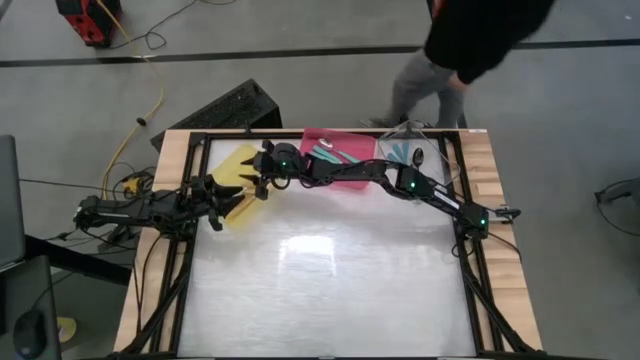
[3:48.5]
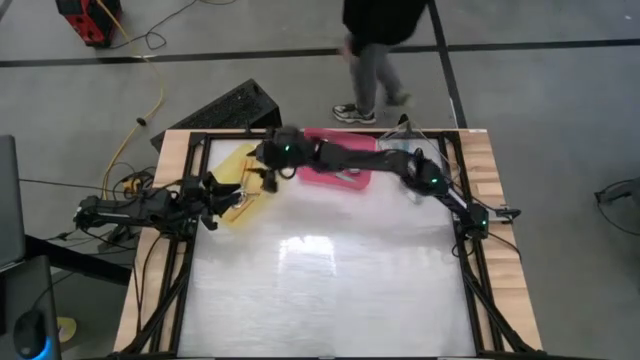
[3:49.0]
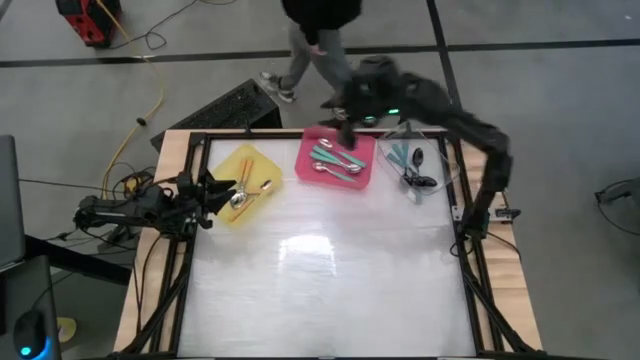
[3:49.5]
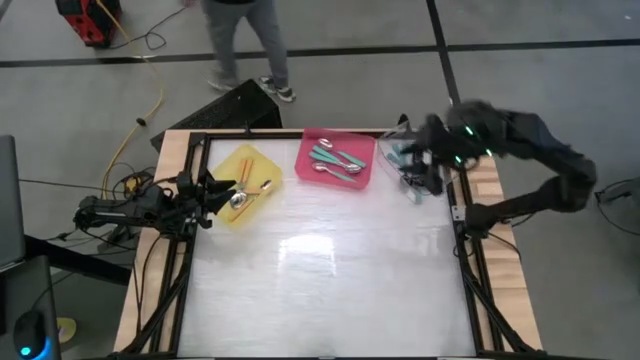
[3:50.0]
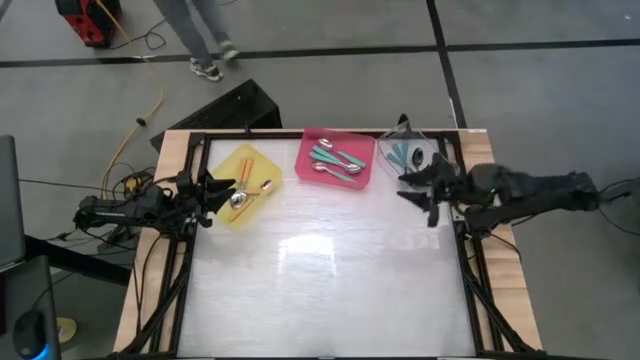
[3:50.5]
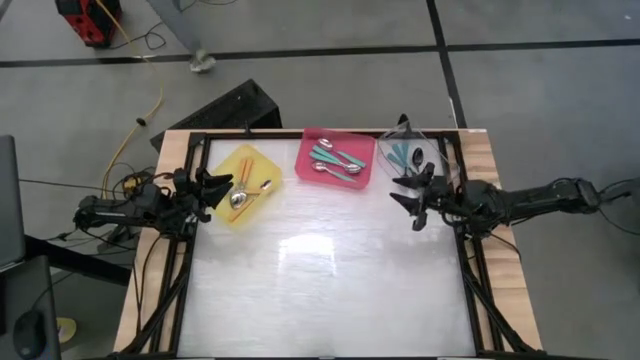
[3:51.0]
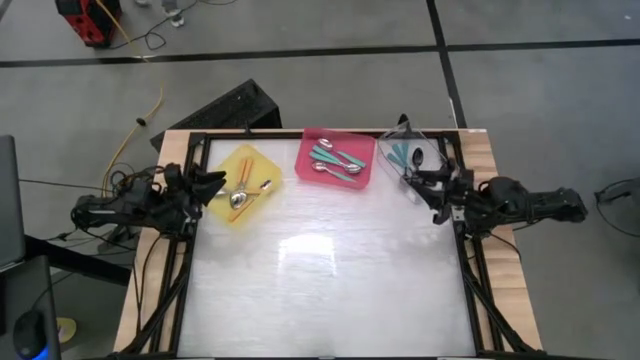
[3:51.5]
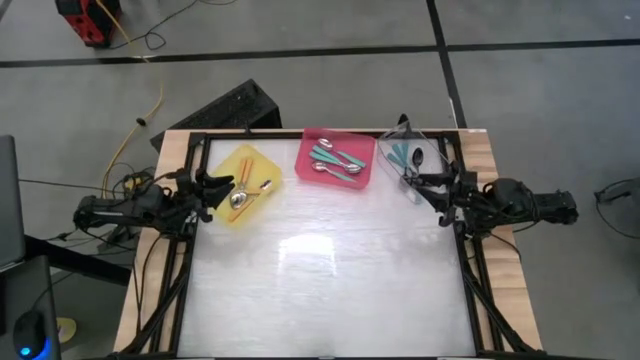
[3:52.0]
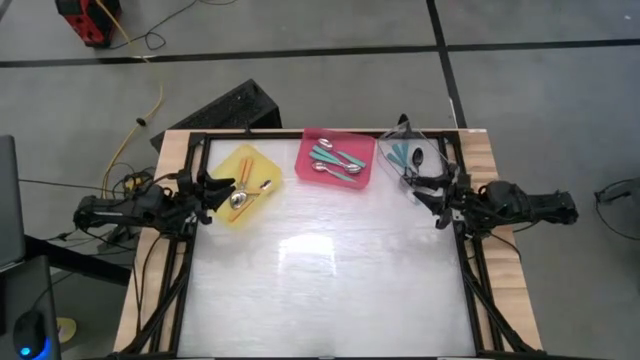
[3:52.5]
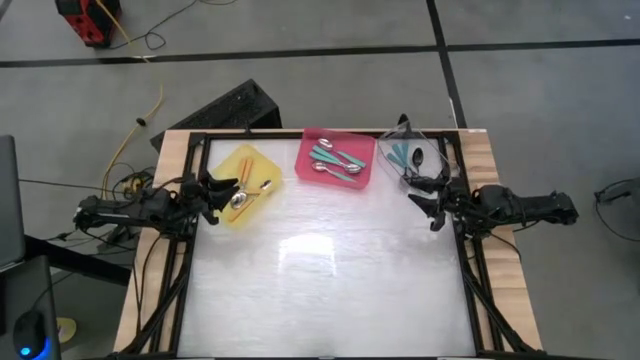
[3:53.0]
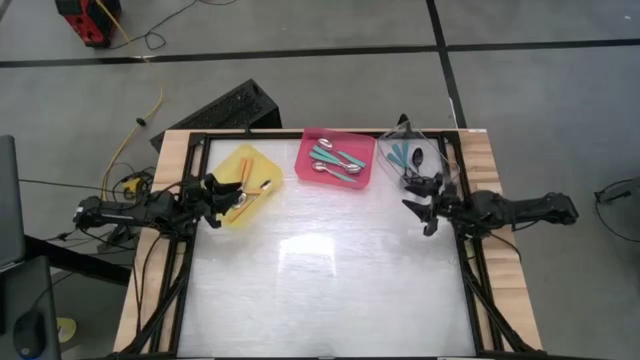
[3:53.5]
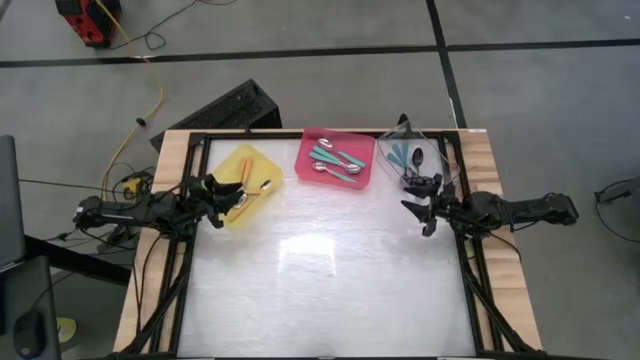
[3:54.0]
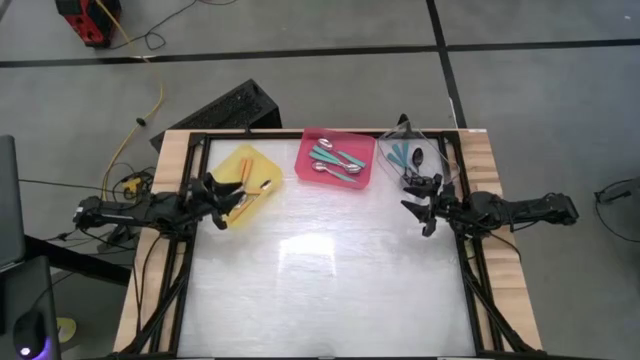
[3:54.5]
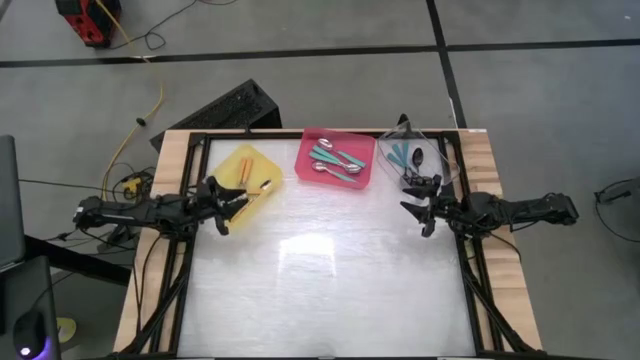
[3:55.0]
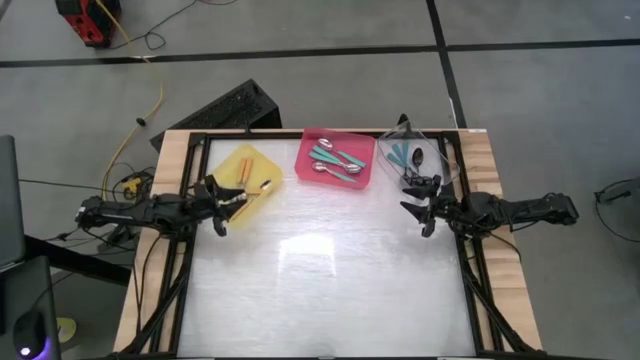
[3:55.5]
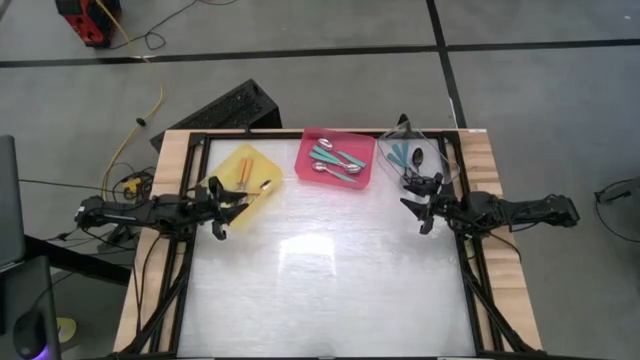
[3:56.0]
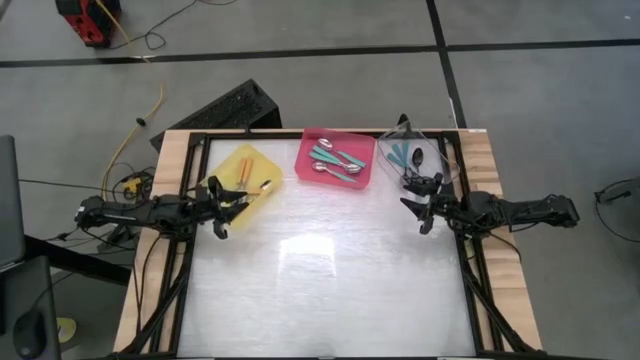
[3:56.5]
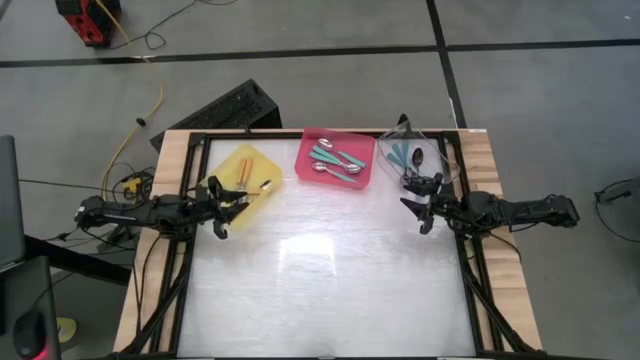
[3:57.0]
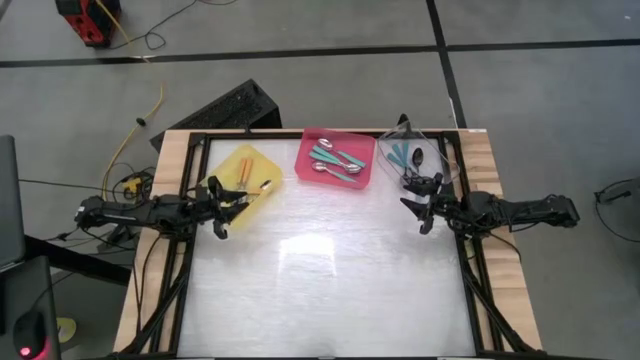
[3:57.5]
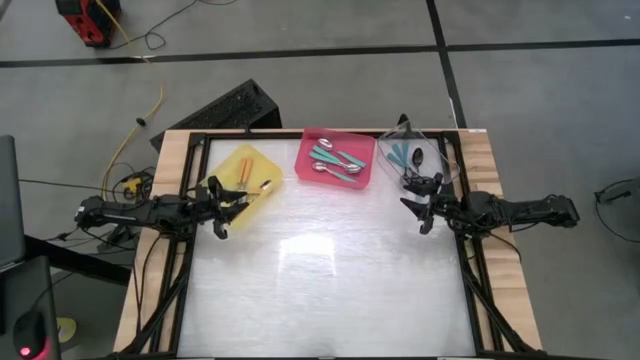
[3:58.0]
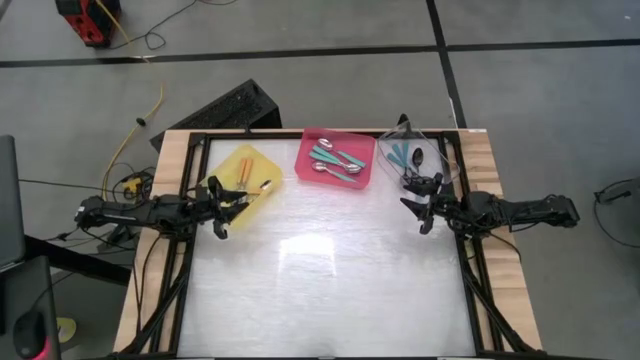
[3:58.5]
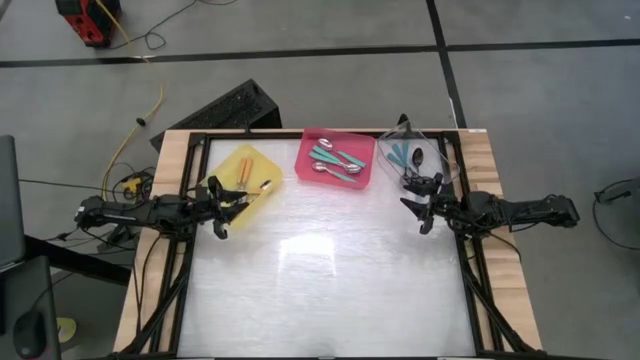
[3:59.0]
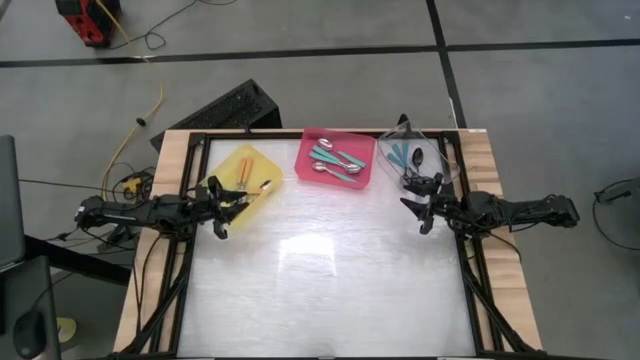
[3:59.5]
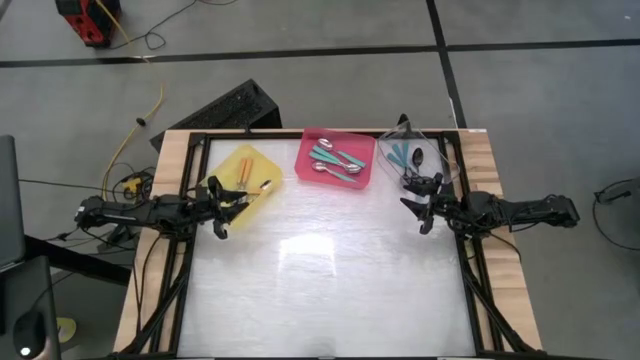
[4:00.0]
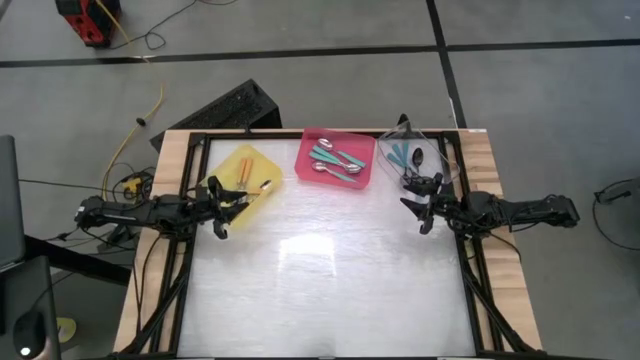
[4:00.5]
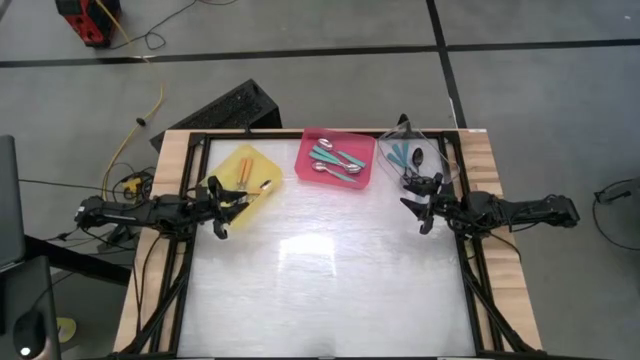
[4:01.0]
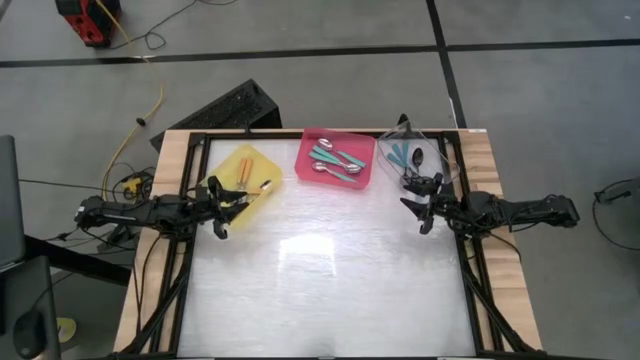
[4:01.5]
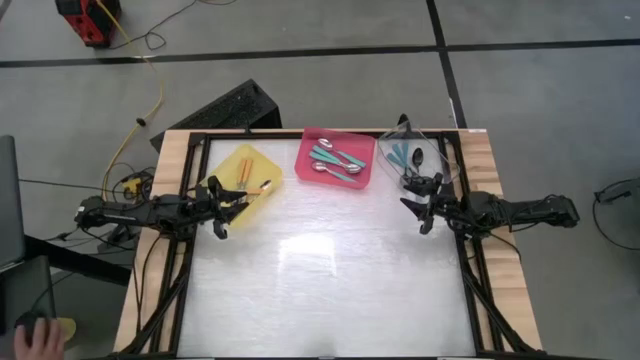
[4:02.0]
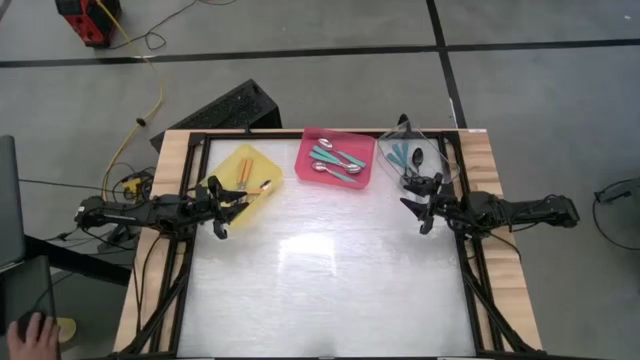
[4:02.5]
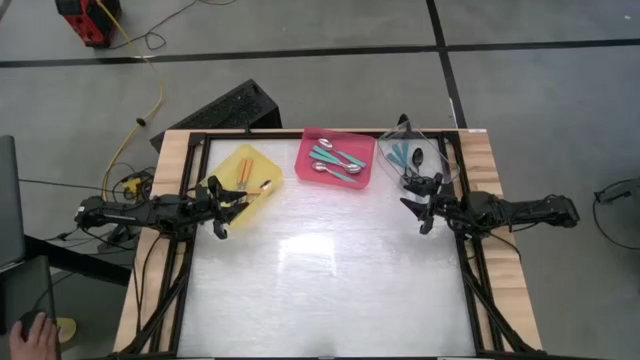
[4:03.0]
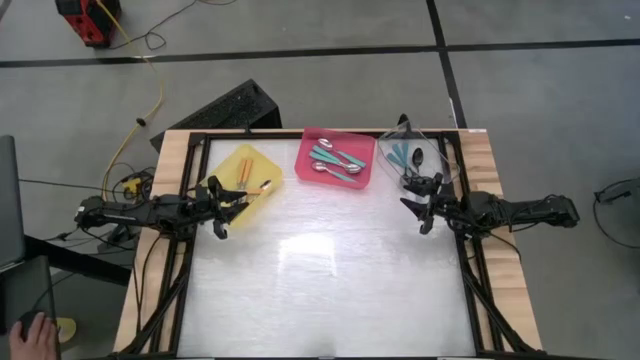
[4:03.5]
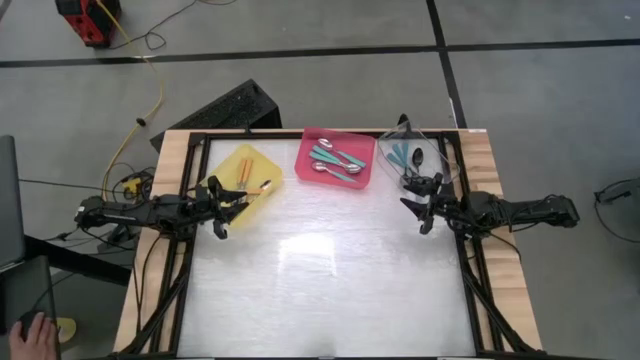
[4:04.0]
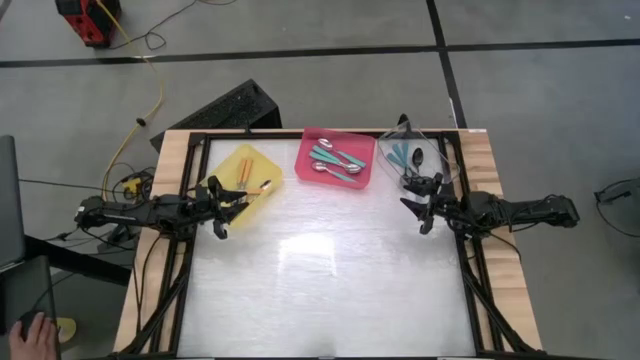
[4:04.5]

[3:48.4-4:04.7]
Task: Sort silverware by color (type)
Return to Home Position

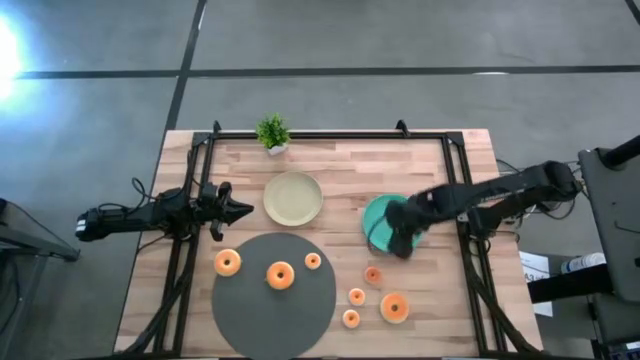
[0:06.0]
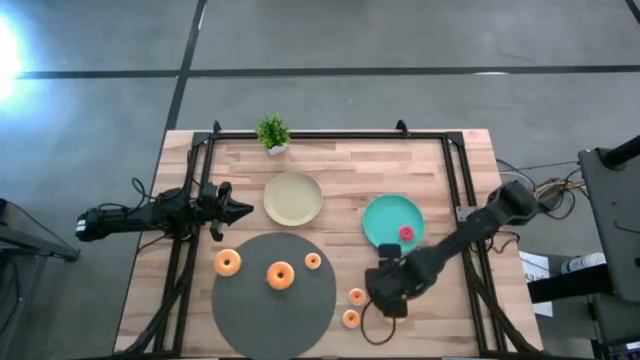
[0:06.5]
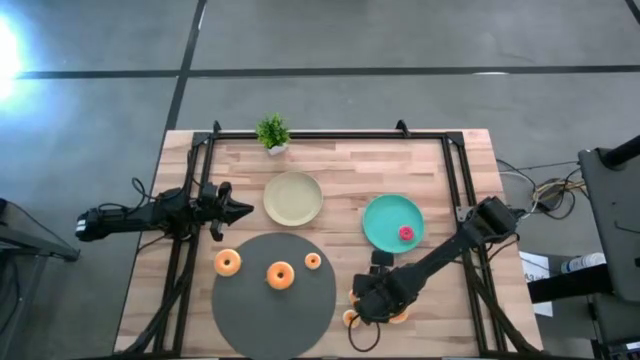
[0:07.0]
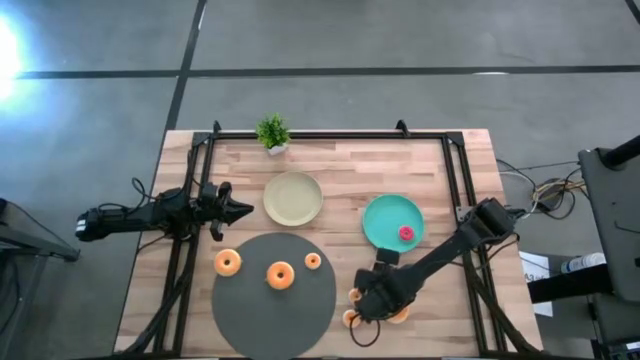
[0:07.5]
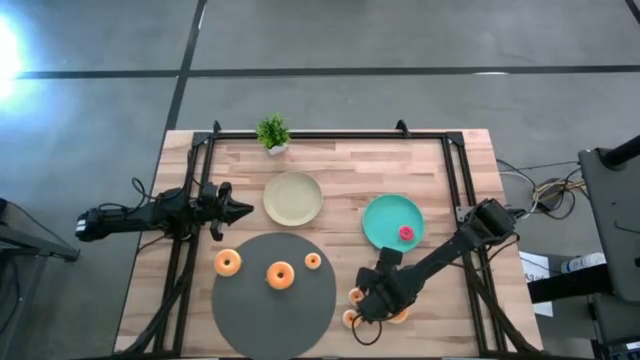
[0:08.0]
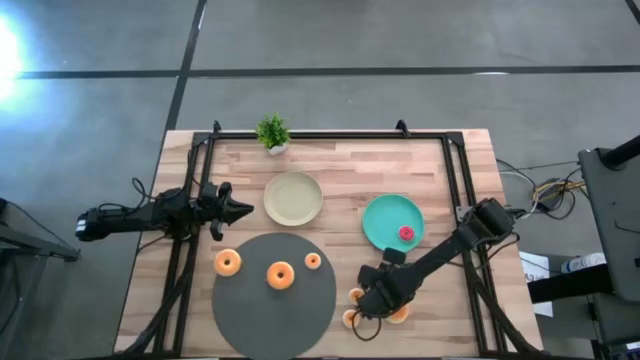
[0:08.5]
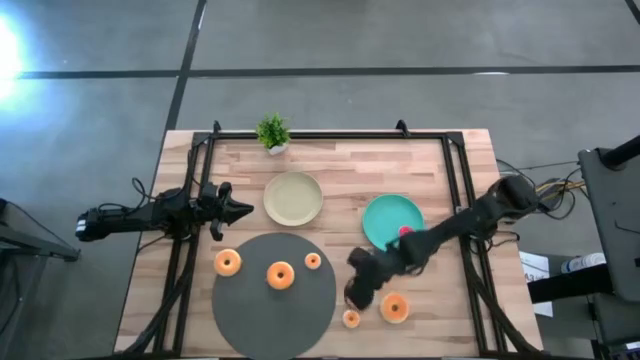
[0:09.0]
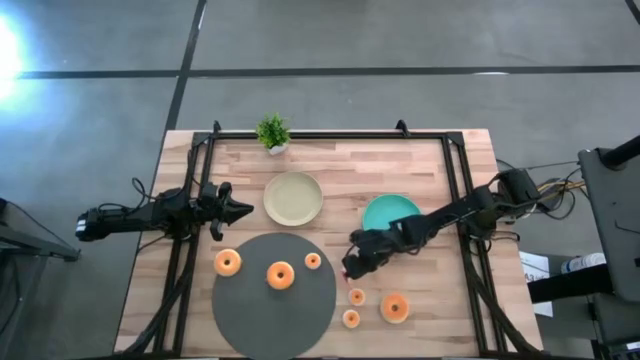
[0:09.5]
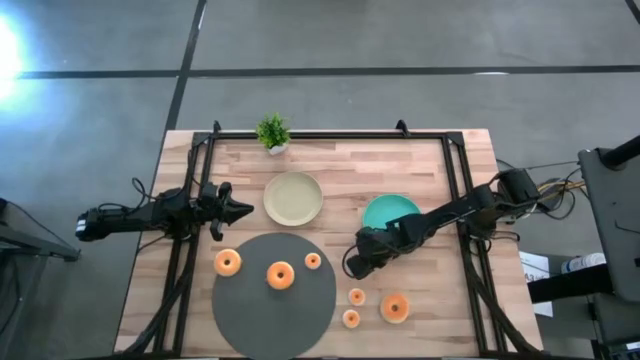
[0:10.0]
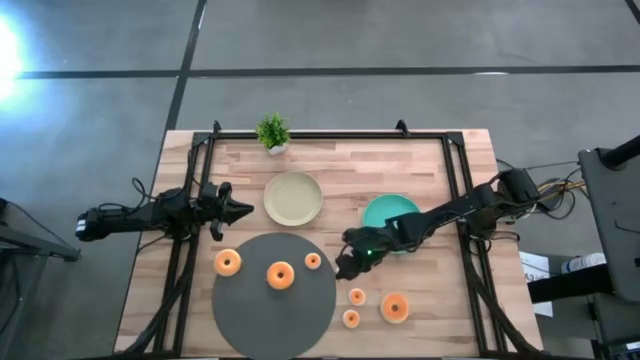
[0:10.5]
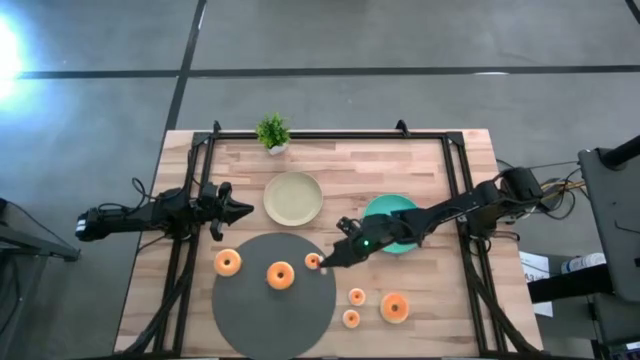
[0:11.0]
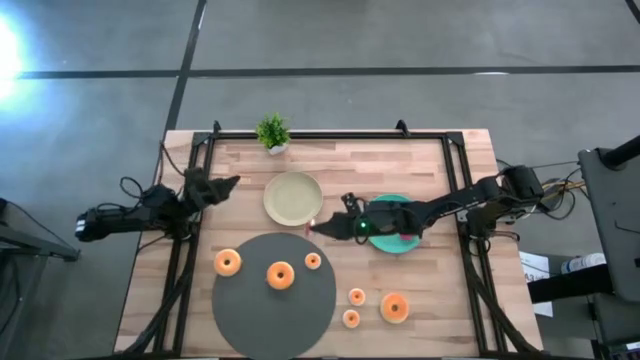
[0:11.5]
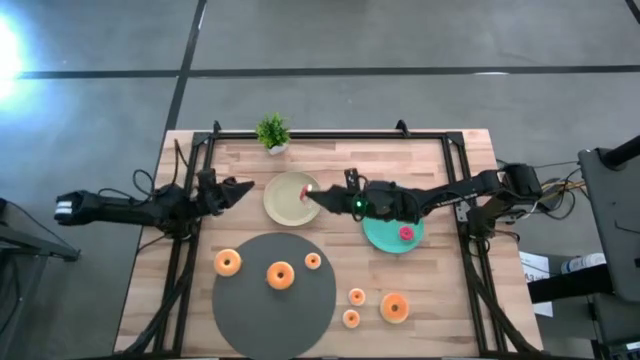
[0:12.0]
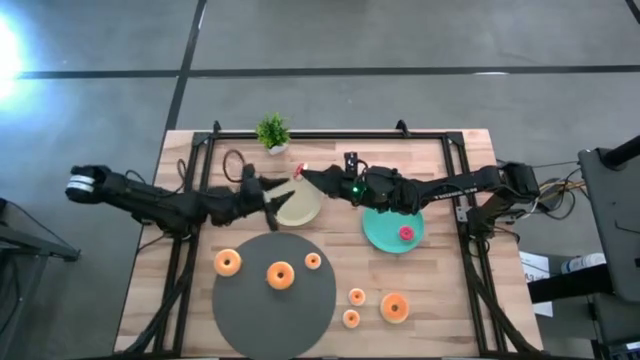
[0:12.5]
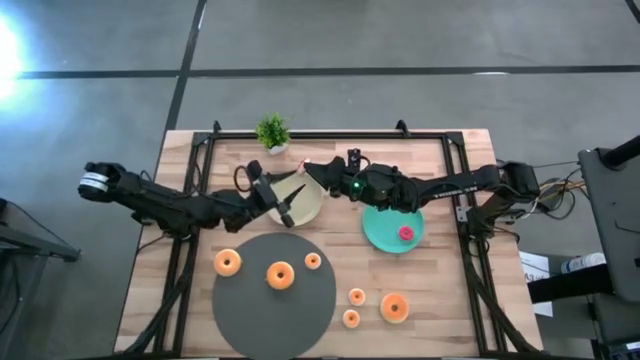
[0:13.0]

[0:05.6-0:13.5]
Task: Pick & Place donuts
Put the small orange donut on the blue plate
